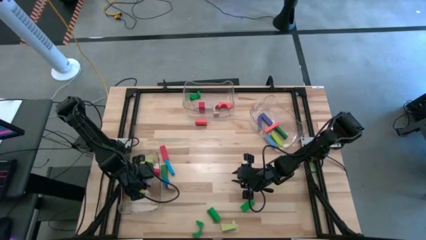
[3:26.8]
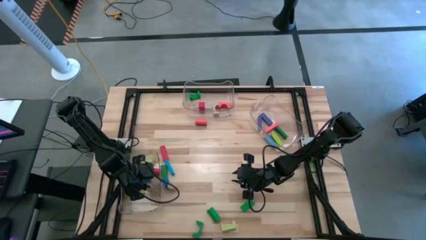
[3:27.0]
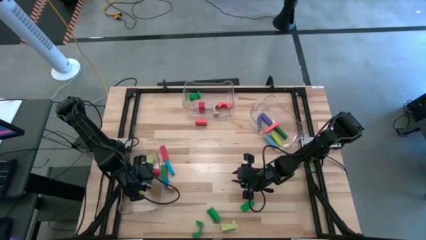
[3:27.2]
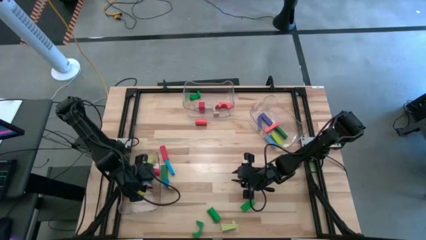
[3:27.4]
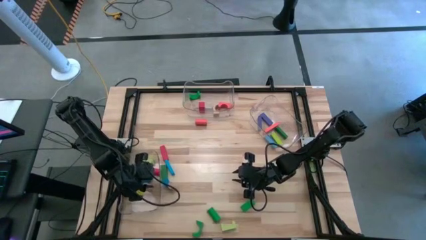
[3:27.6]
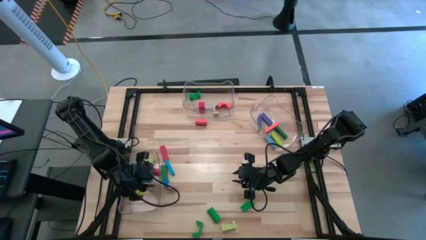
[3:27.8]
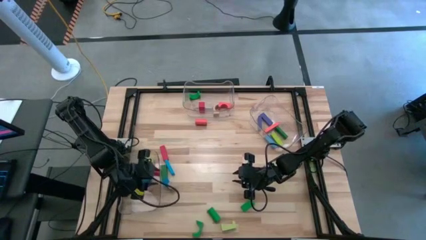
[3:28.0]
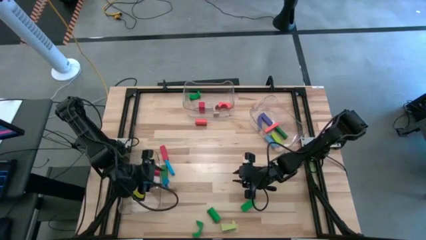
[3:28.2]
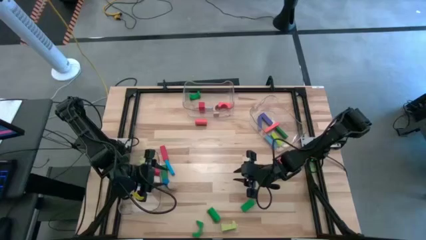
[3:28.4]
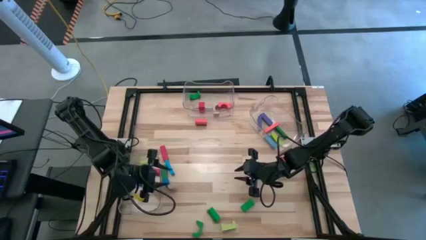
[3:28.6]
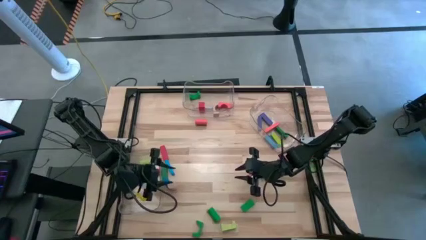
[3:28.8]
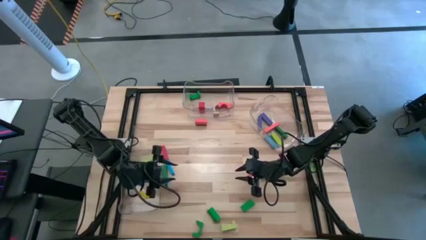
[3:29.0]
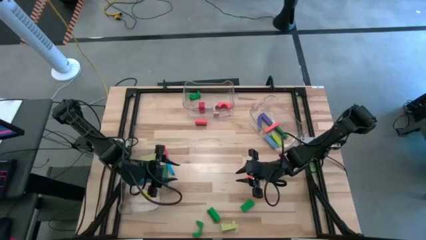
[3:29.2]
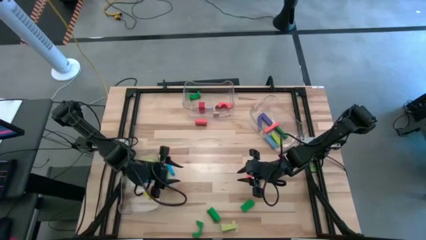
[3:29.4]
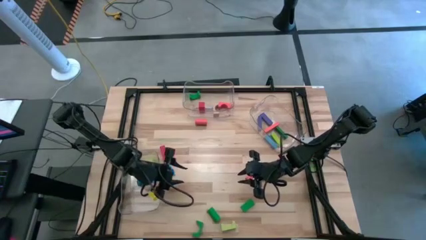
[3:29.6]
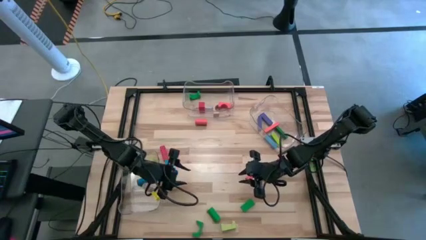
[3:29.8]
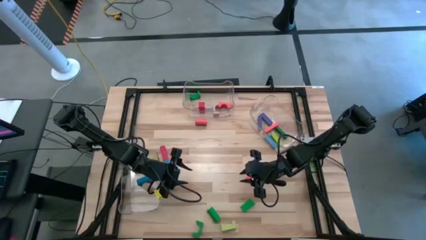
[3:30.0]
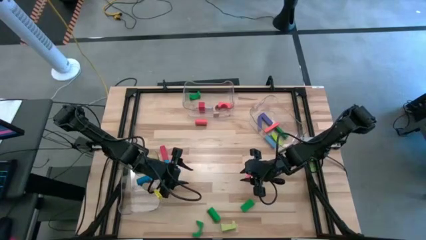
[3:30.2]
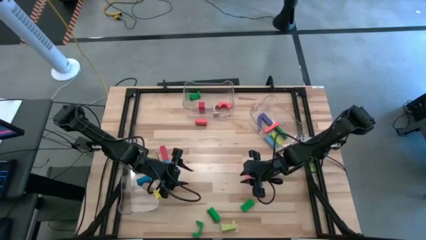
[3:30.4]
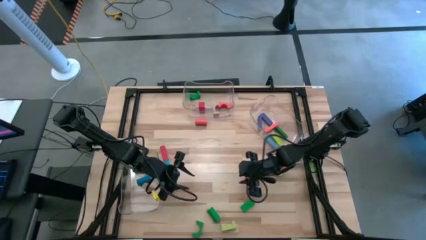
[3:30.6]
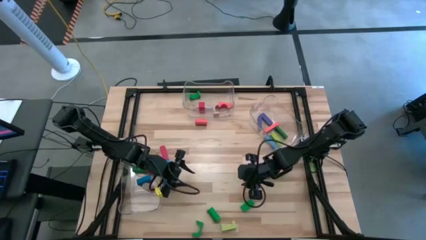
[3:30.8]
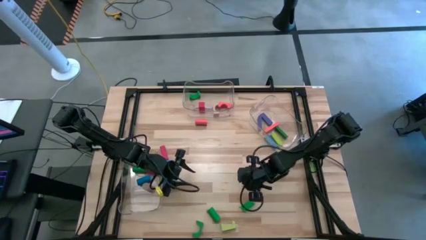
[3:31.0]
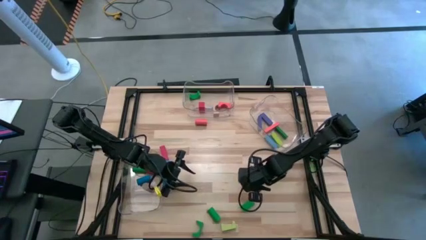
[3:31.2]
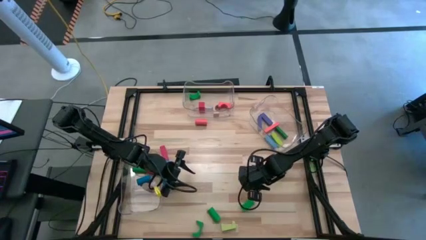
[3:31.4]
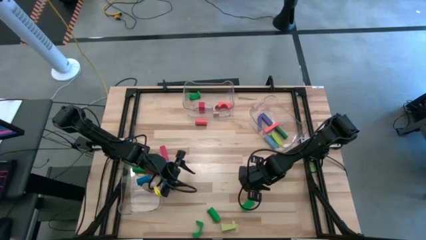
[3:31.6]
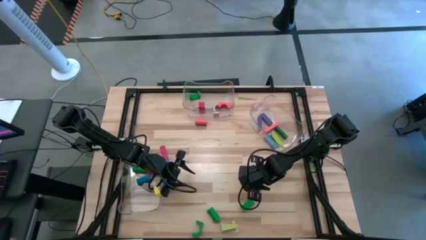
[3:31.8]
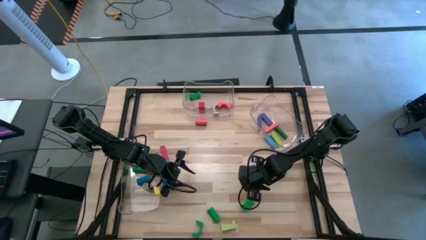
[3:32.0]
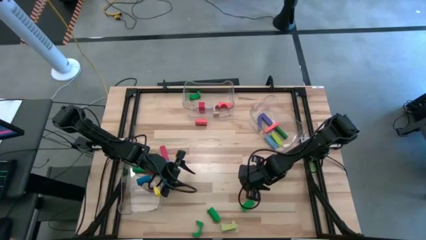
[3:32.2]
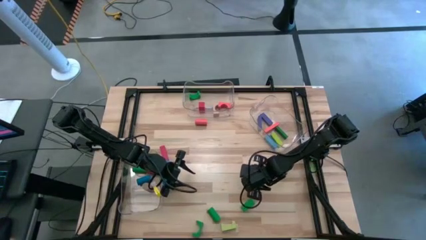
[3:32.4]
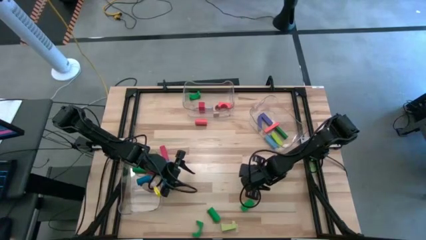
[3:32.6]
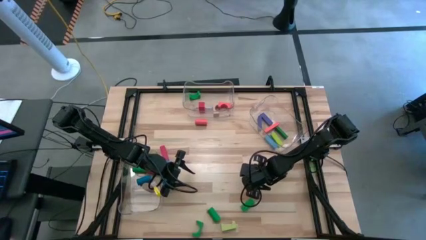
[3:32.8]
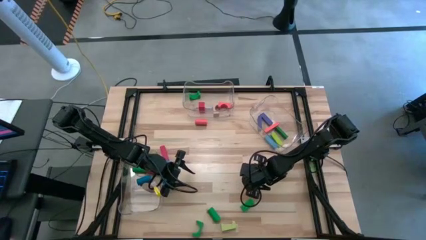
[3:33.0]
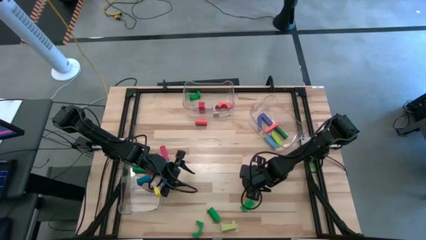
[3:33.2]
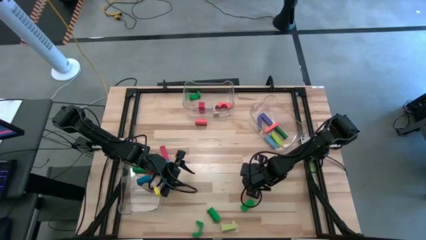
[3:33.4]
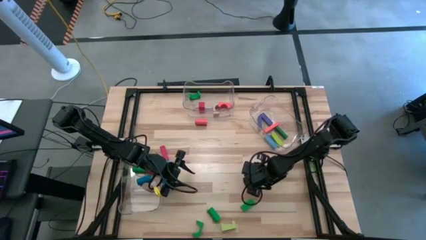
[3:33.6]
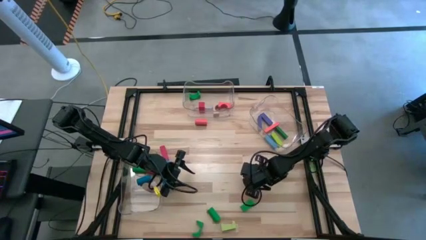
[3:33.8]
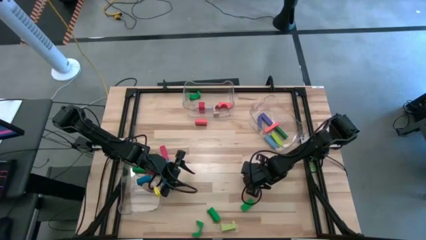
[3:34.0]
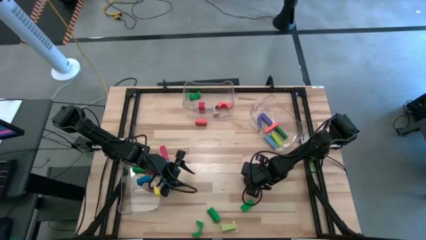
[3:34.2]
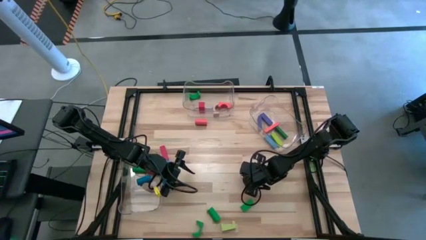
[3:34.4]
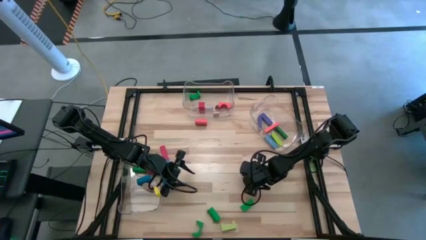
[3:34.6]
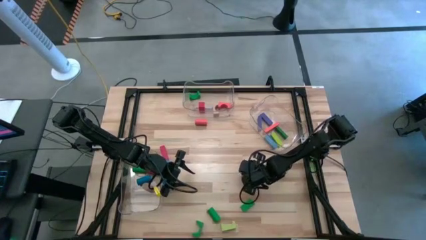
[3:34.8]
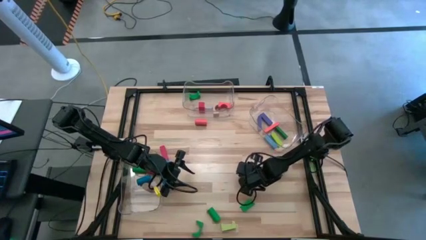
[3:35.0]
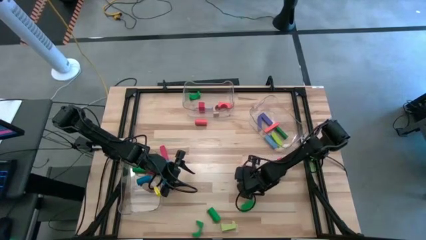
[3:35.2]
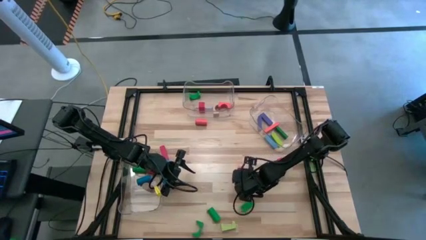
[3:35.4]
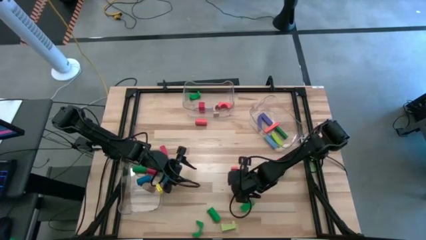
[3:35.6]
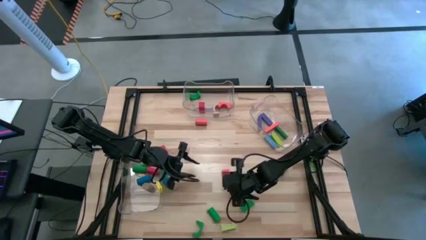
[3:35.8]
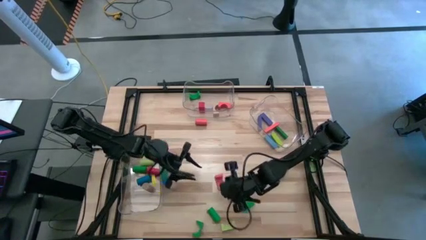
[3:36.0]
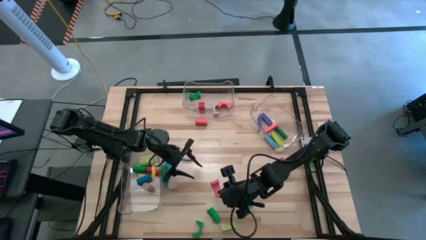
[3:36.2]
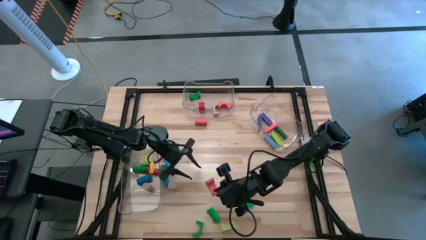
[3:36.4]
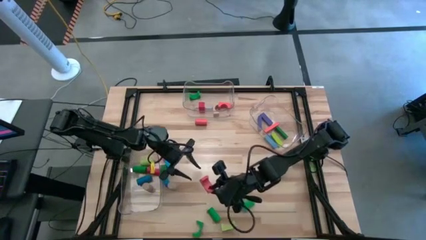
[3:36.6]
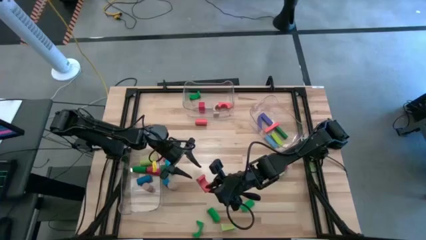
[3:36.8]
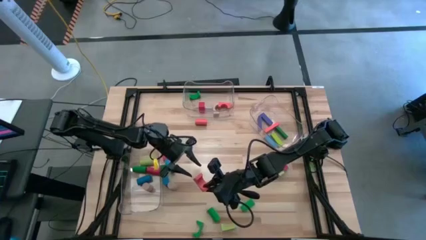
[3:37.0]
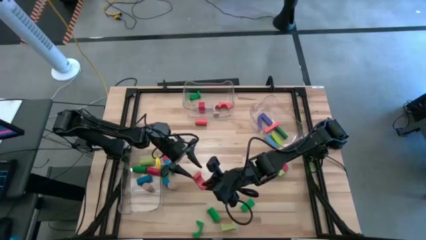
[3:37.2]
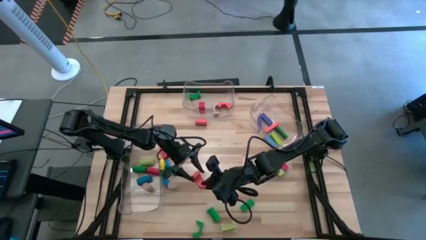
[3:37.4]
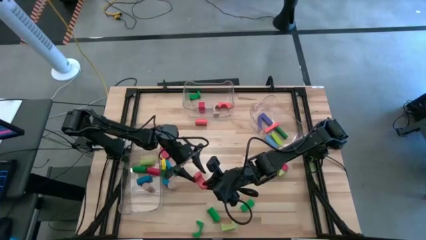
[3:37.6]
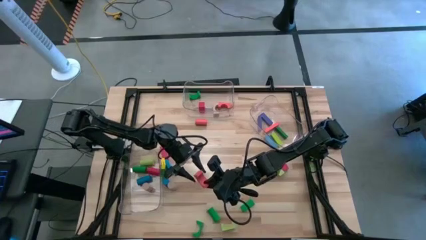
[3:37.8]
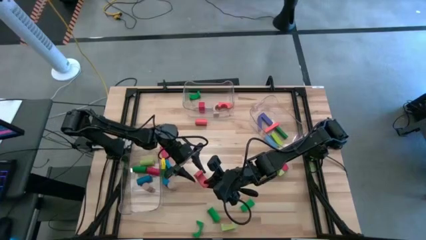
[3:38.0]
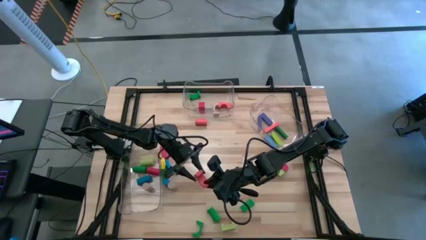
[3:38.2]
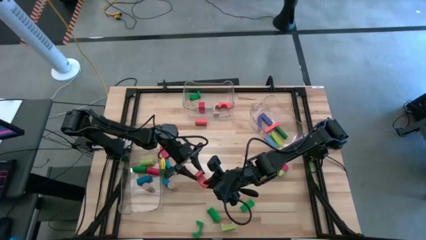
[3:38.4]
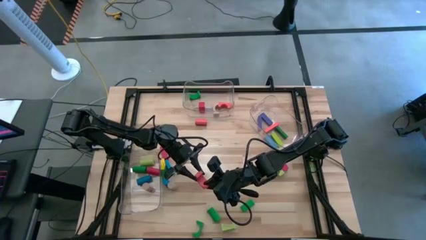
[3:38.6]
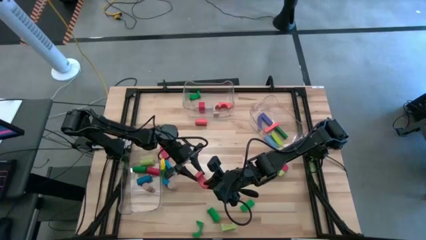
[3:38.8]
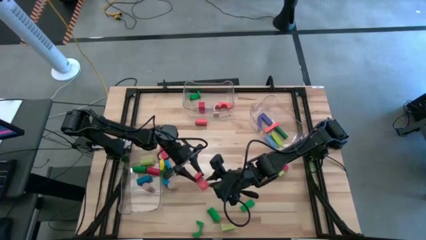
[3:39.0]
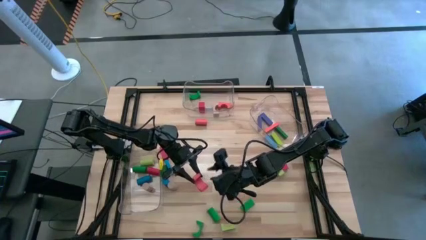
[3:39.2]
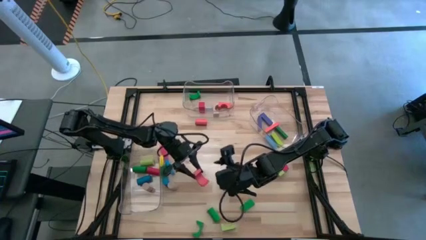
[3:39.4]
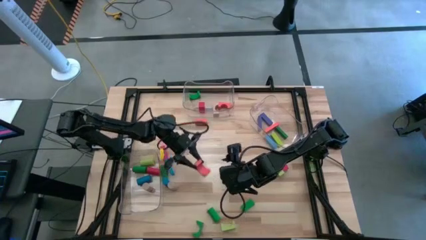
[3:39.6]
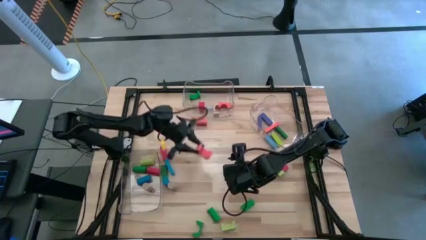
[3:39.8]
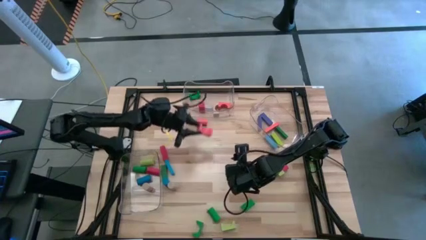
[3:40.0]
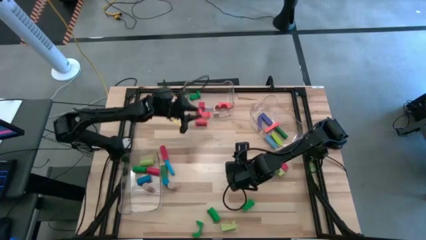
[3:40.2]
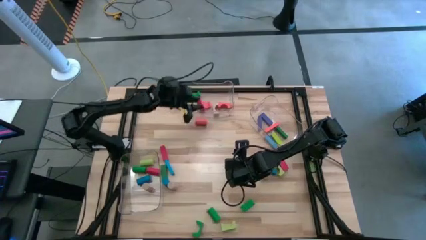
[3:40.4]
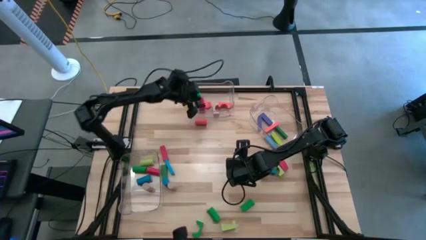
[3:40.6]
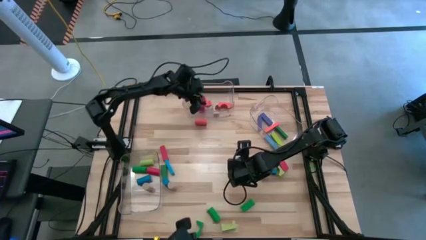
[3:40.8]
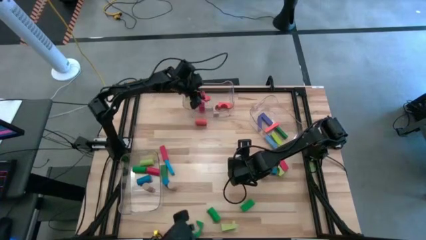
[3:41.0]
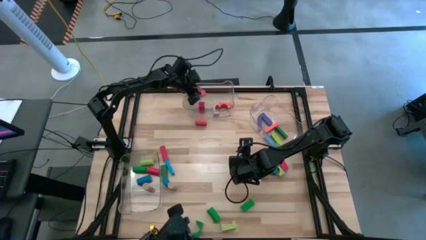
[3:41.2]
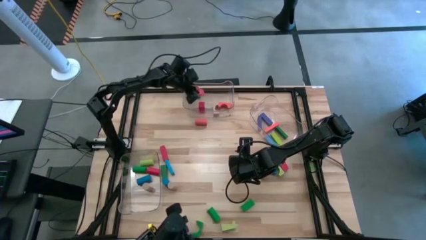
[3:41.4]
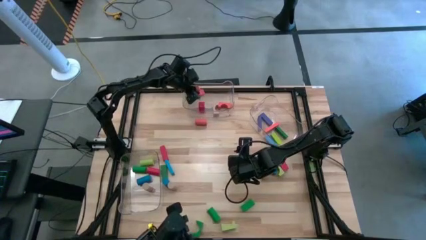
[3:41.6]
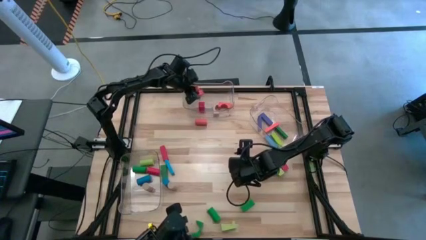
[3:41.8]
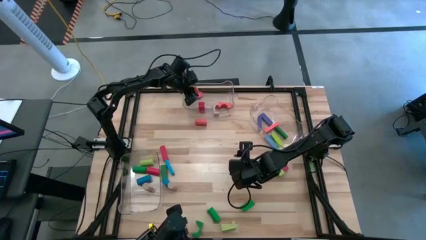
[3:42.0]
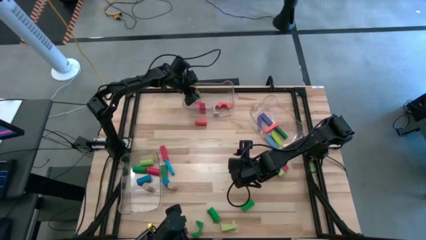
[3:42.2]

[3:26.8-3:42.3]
Task: Sort blocks by size
Put the orange arch block into the middle transparent bin
